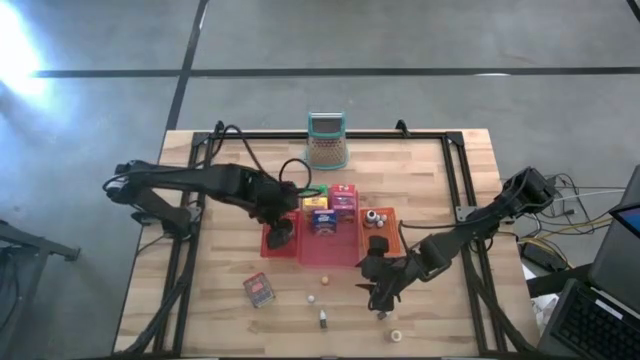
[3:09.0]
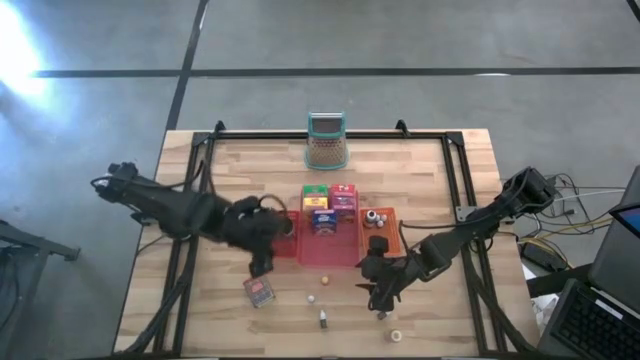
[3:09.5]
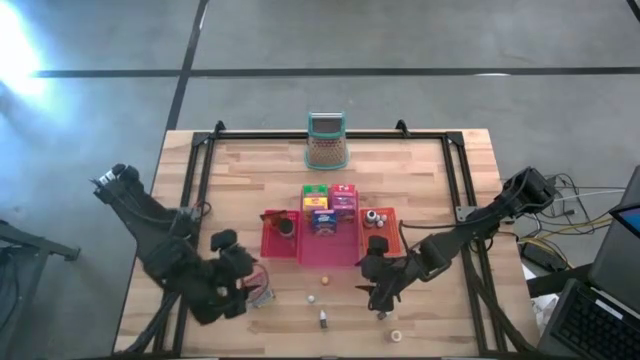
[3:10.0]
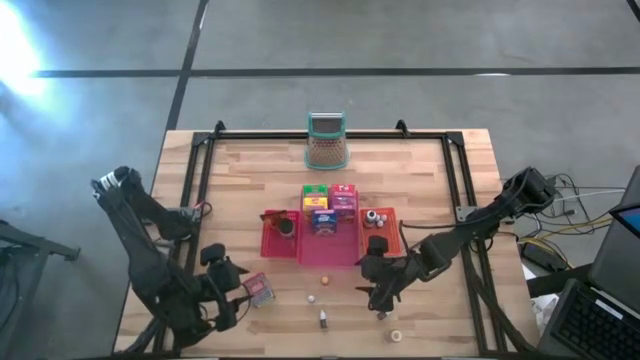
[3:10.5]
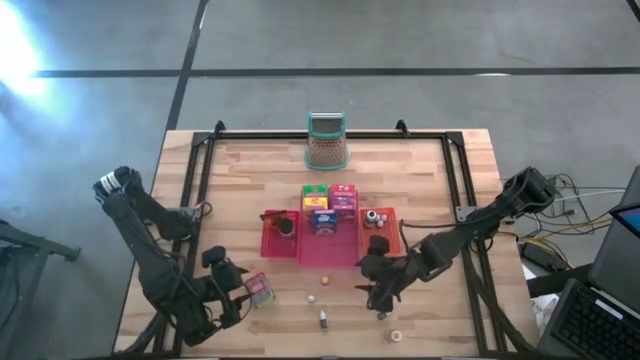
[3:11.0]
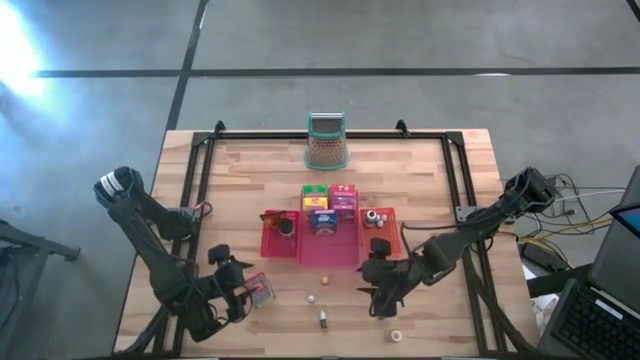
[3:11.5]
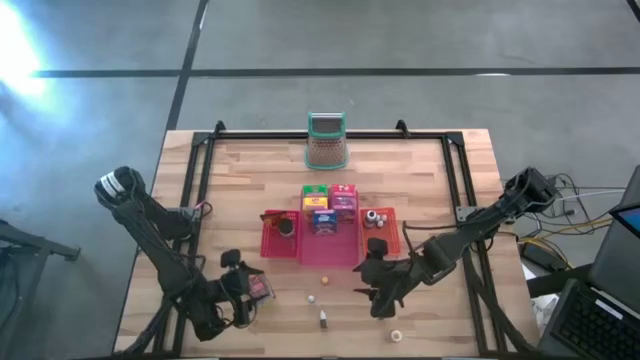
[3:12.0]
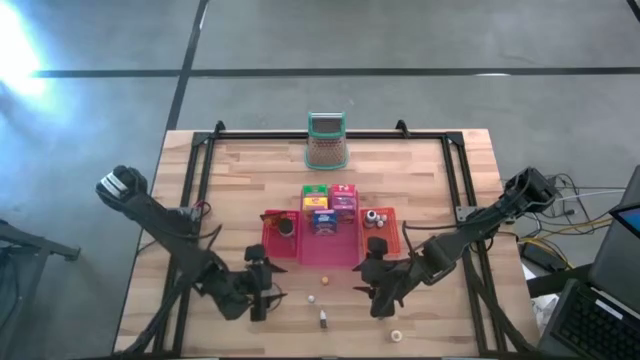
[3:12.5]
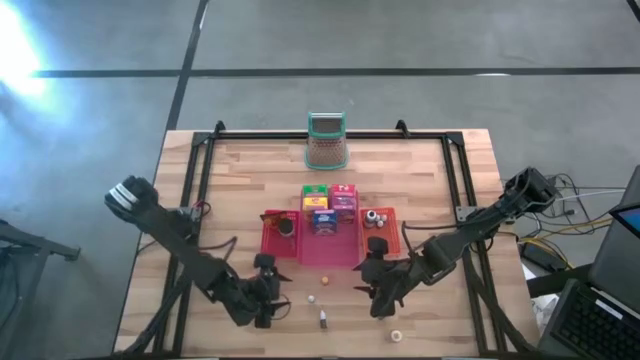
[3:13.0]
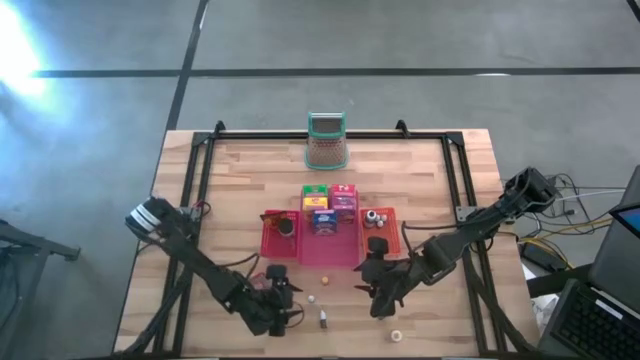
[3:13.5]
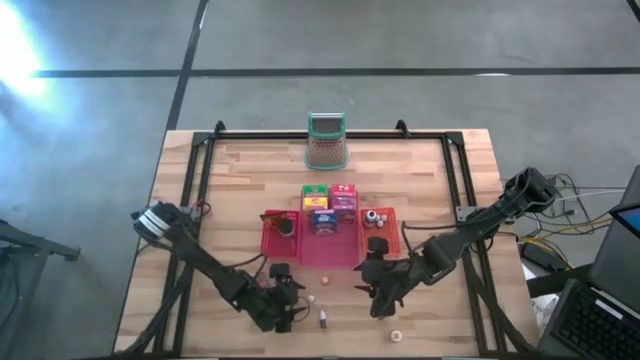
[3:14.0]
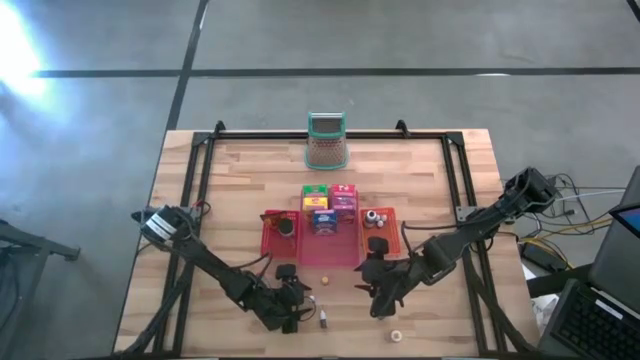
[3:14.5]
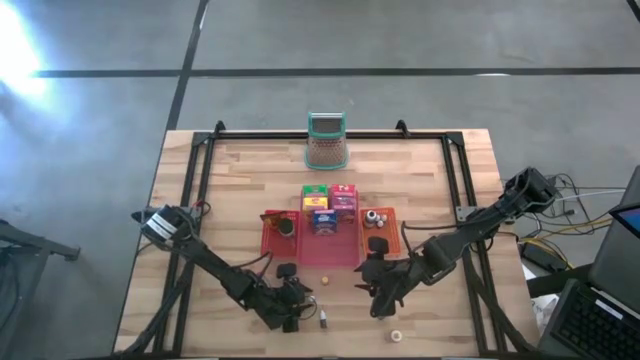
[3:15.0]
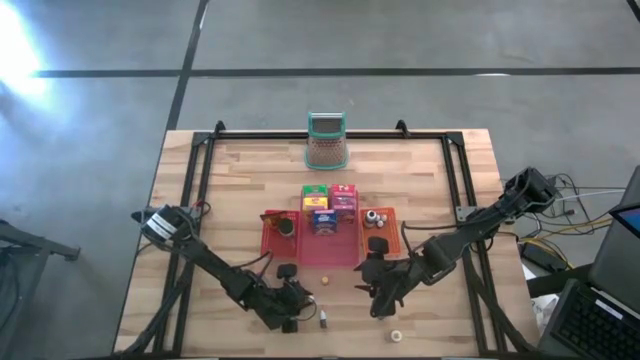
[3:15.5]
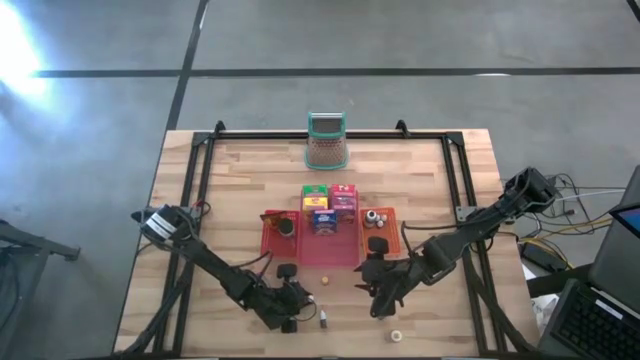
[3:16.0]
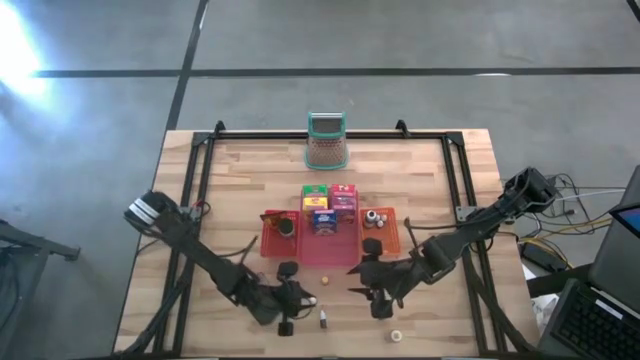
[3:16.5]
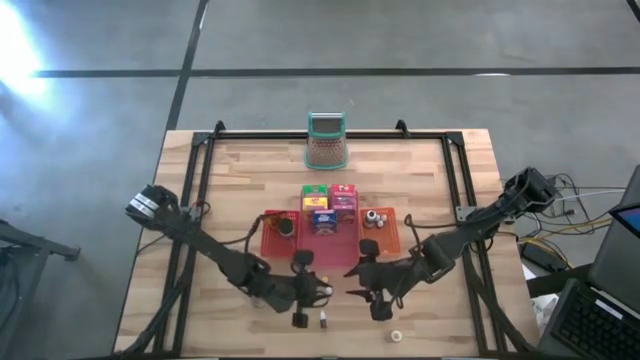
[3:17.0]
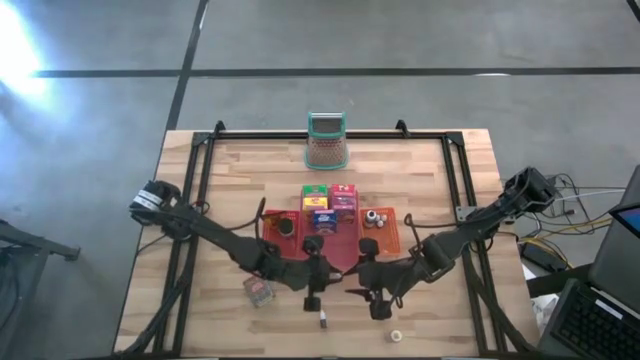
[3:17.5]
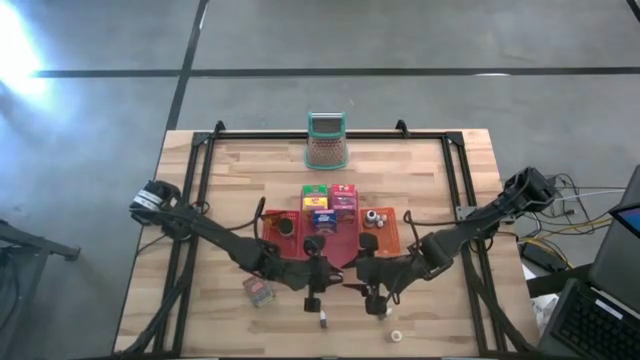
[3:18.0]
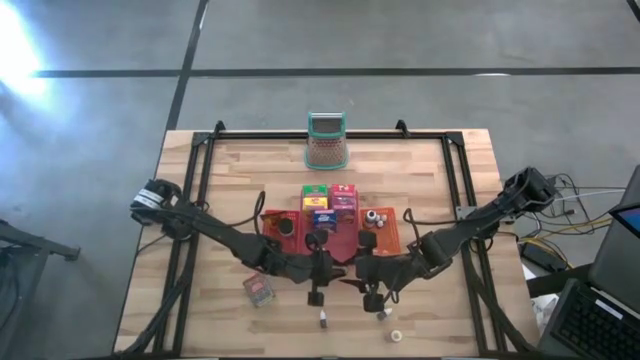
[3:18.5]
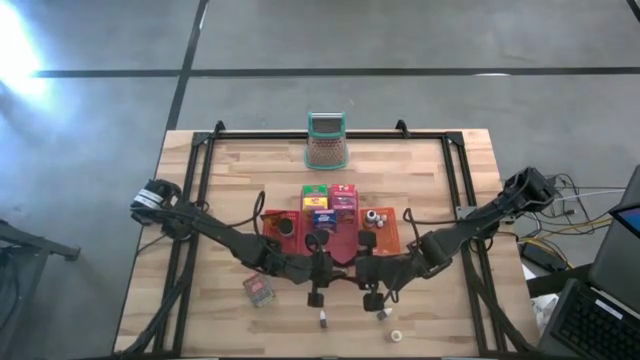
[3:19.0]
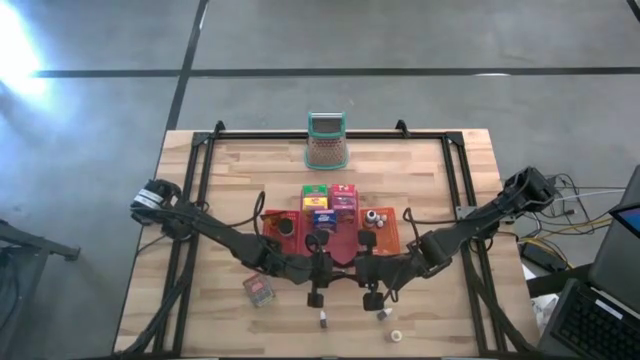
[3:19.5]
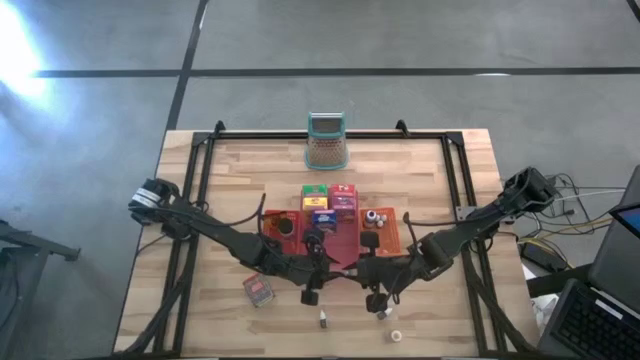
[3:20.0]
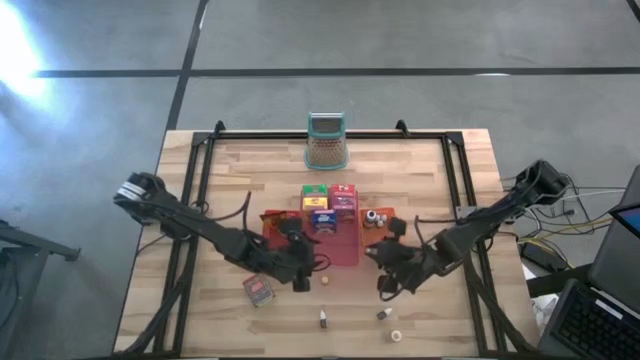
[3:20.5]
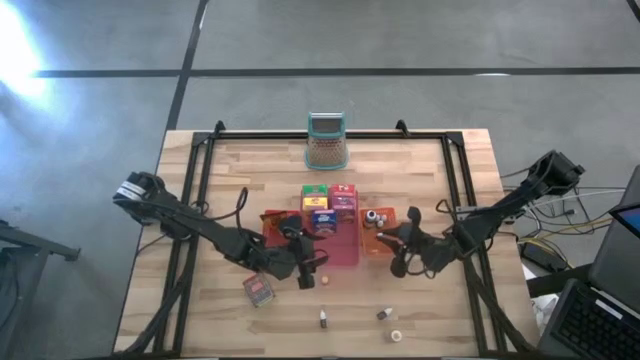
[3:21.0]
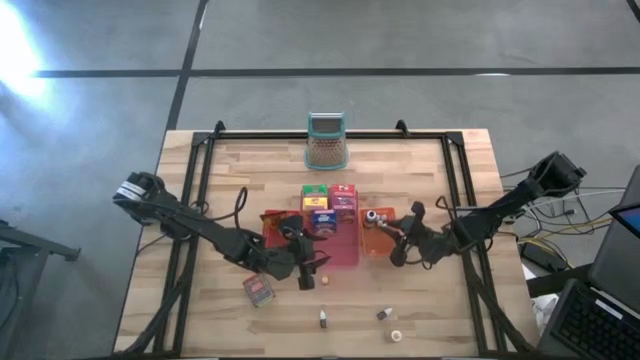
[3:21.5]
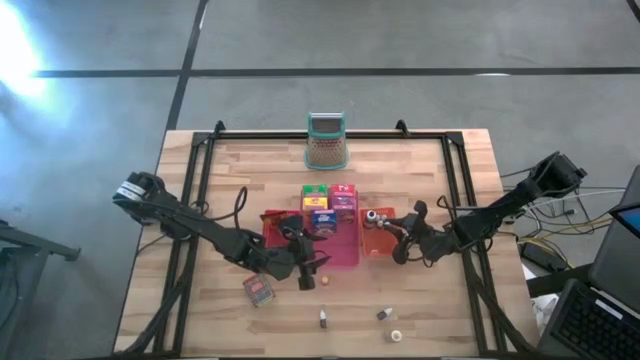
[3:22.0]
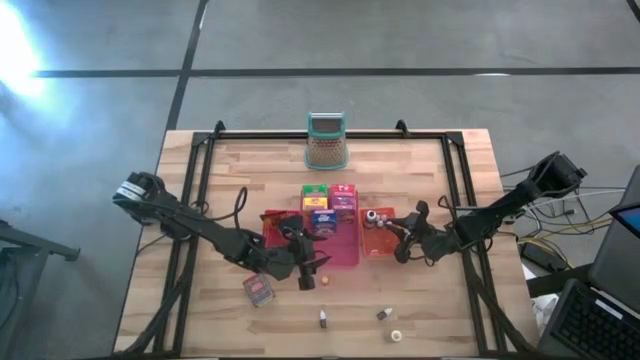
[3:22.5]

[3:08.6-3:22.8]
Task: Pick & Place Kitchen Items
Put the small orange food coloring bottle into the orange bin

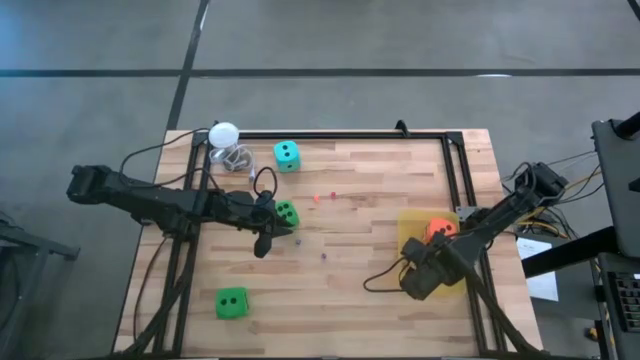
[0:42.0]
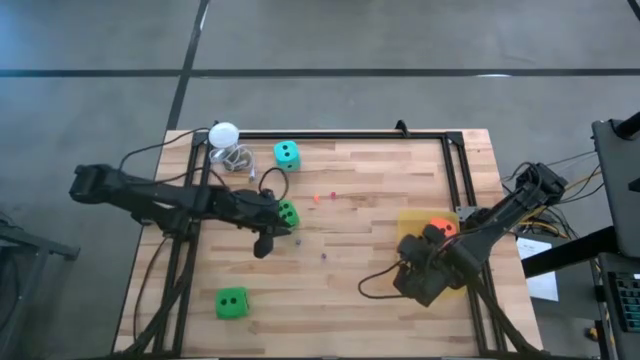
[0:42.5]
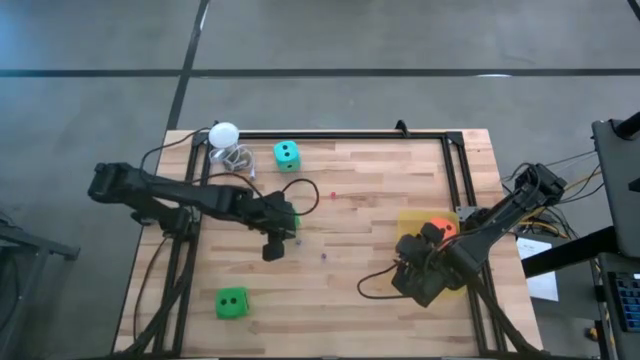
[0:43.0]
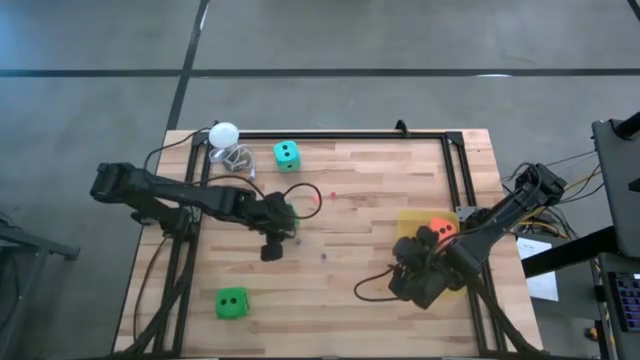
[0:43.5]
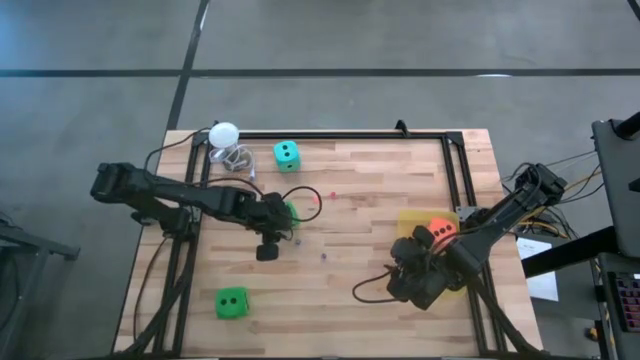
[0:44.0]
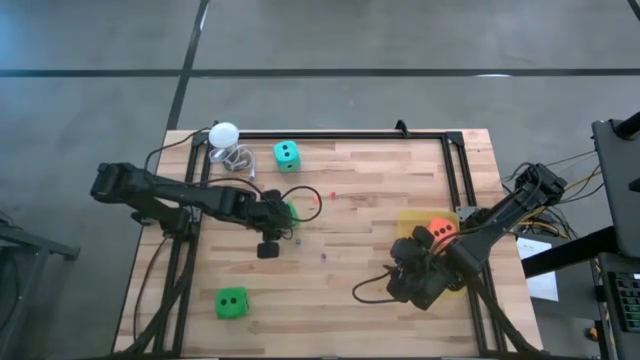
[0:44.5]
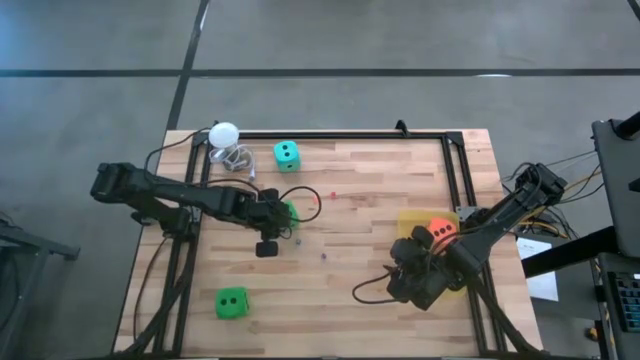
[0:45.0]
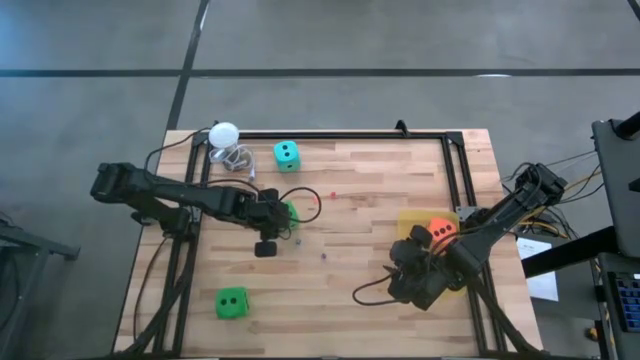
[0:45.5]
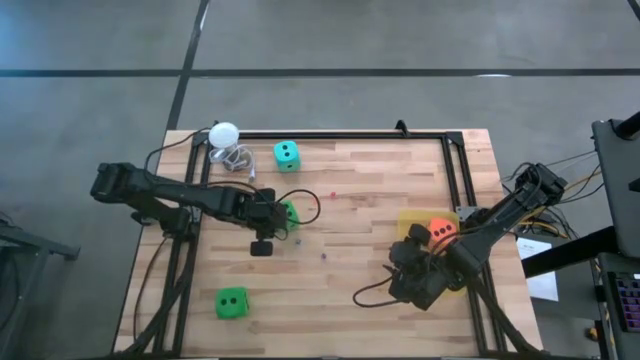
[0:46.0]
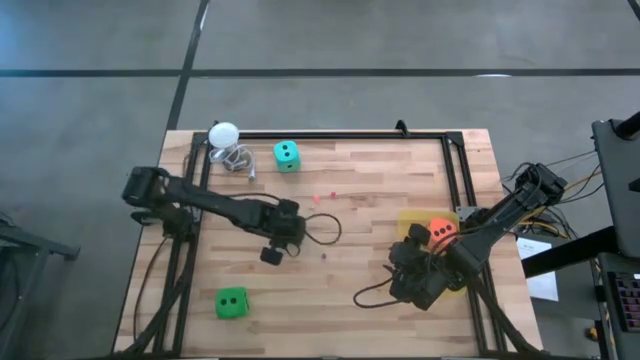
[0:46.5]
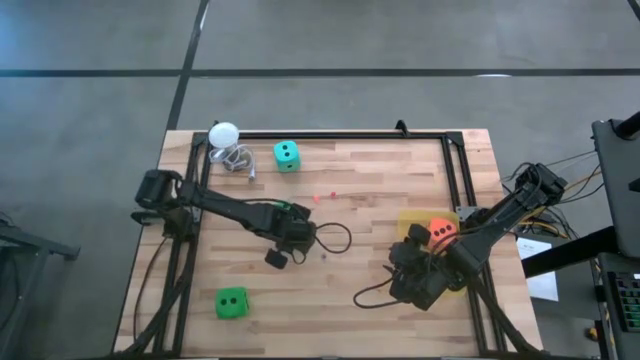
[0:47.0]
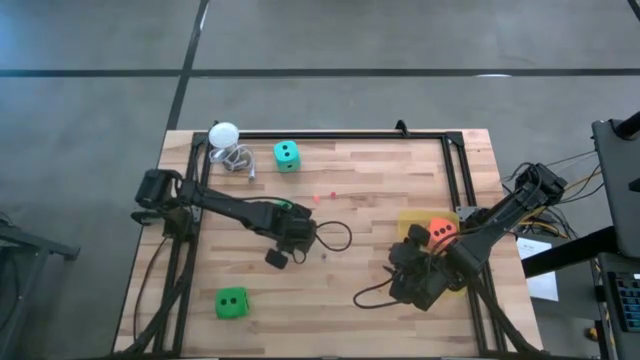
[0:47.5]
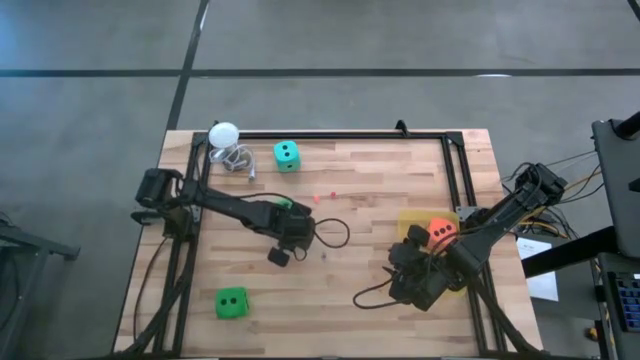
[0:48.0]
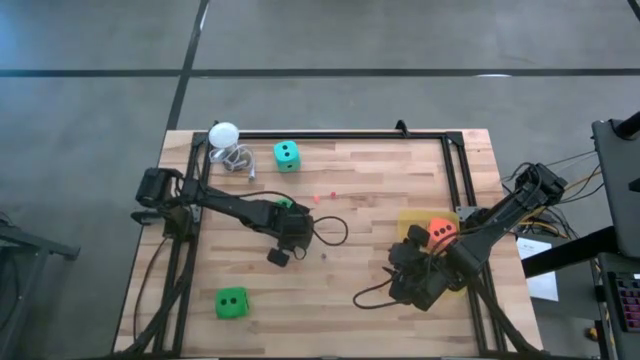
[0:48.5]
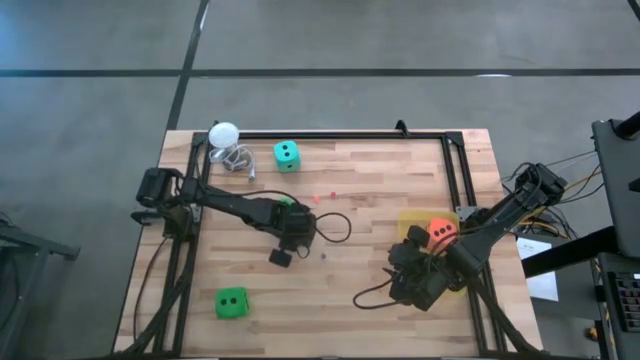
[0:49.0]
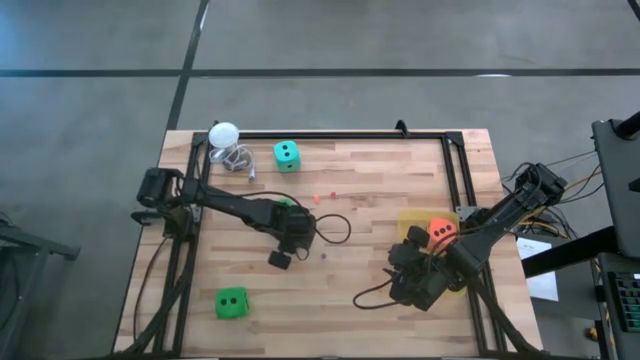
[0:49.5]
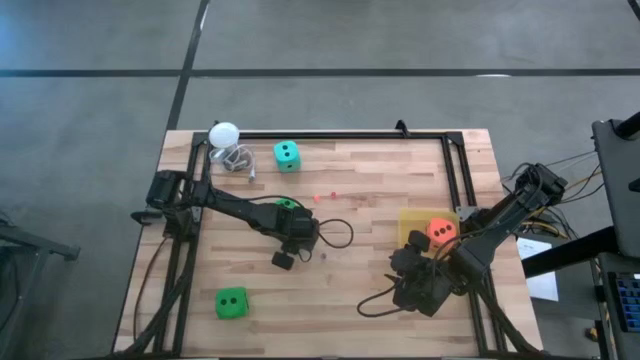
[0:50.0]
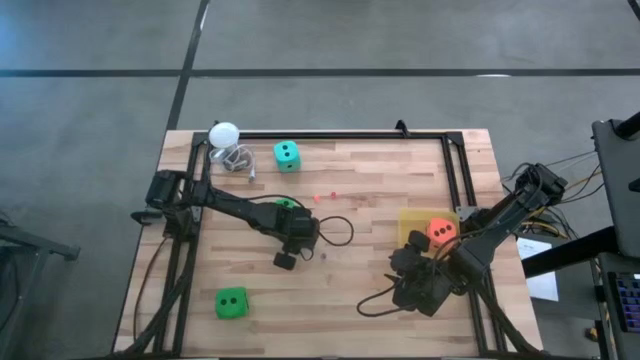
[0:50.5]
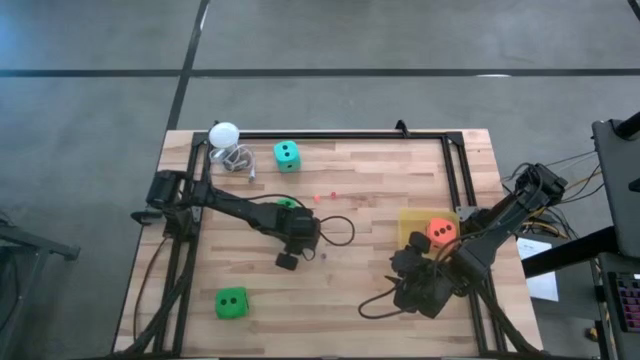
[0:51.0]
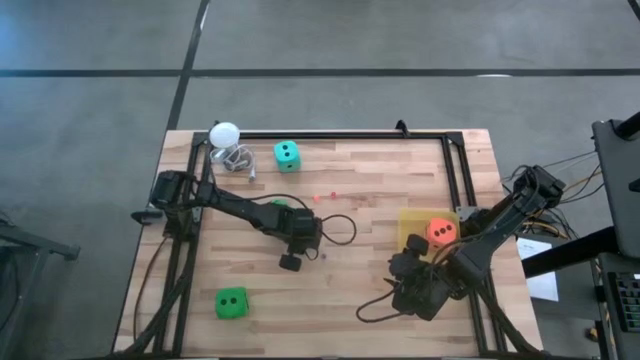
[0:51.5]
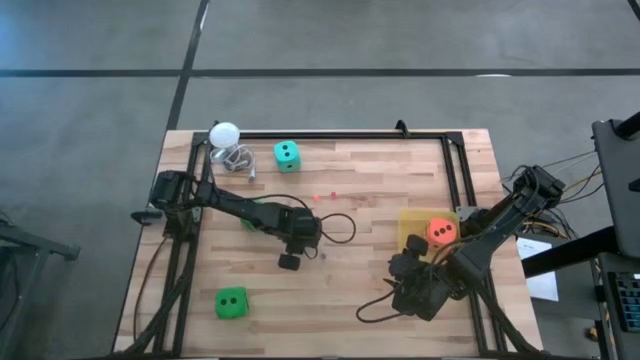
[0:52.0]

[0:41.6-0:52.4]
Task: Pick & Place Dice
Put the small blue dice into the yellow bin
